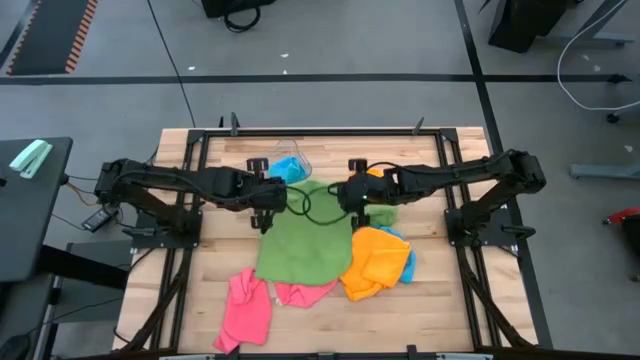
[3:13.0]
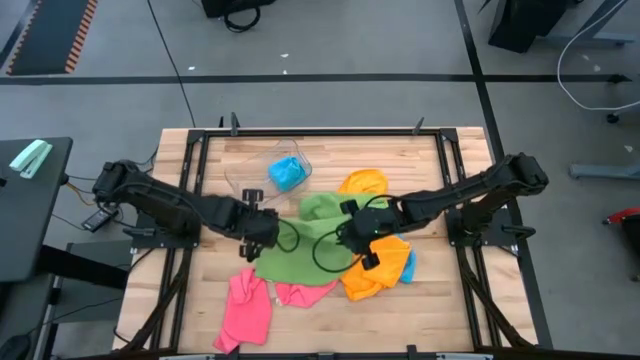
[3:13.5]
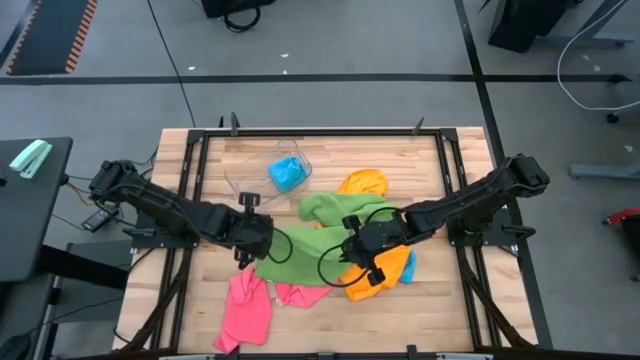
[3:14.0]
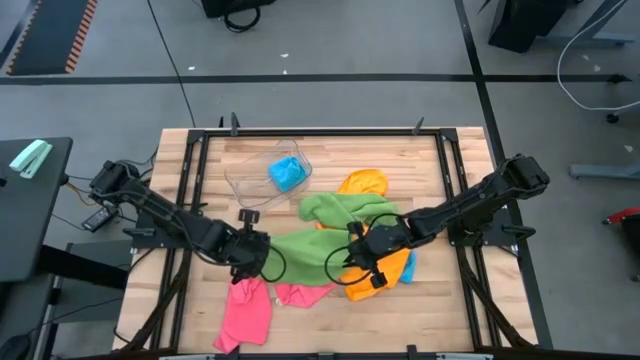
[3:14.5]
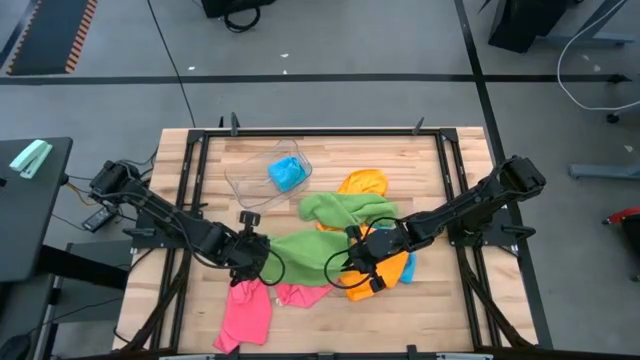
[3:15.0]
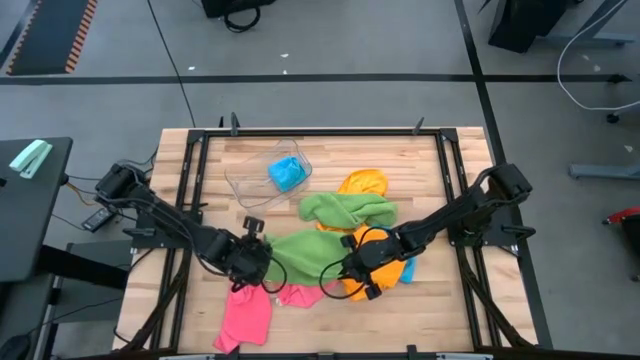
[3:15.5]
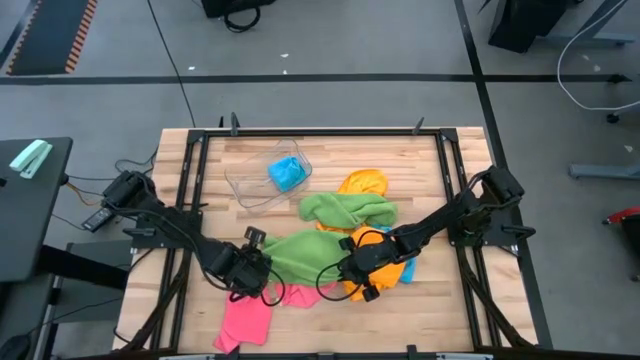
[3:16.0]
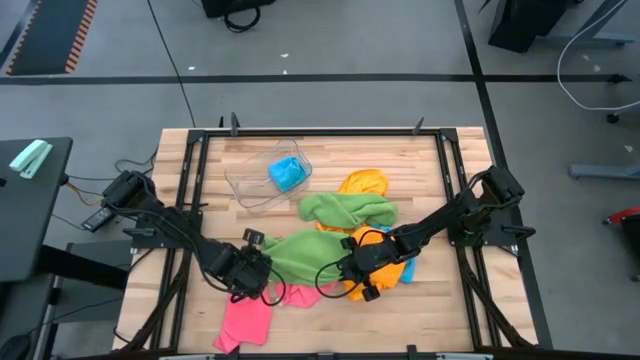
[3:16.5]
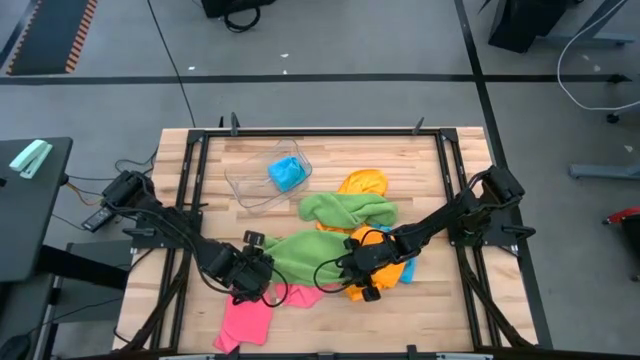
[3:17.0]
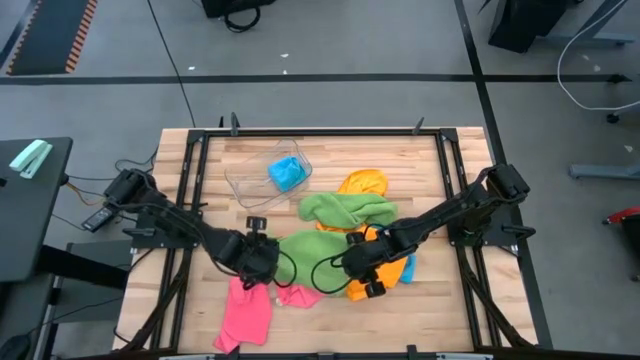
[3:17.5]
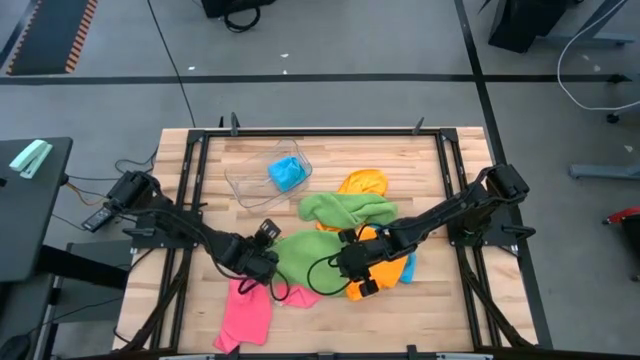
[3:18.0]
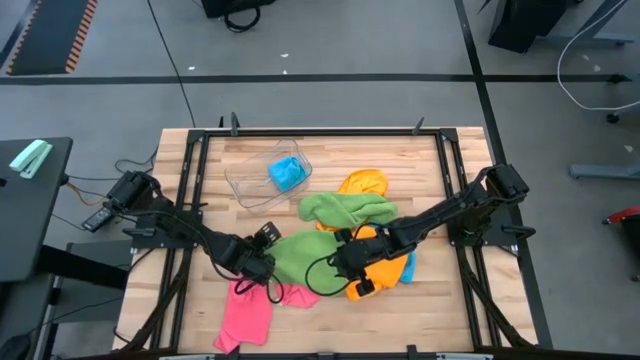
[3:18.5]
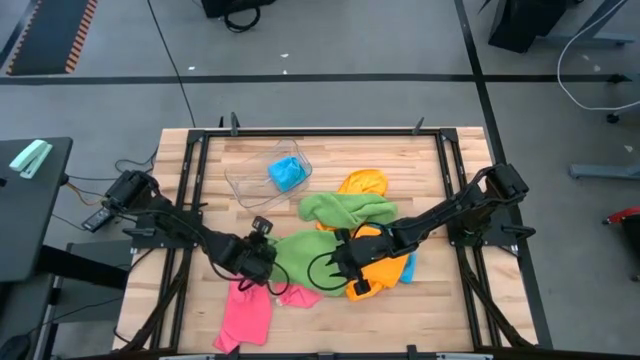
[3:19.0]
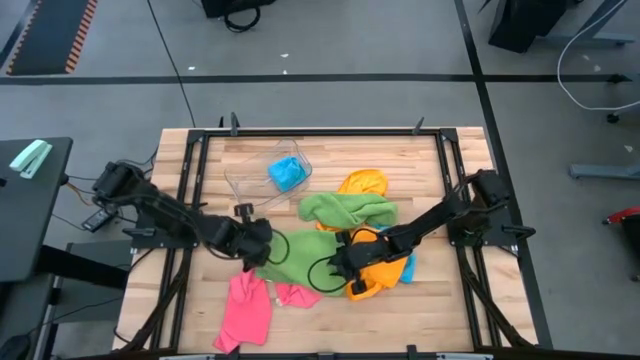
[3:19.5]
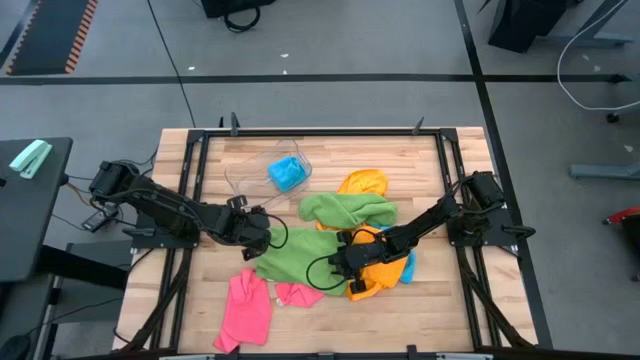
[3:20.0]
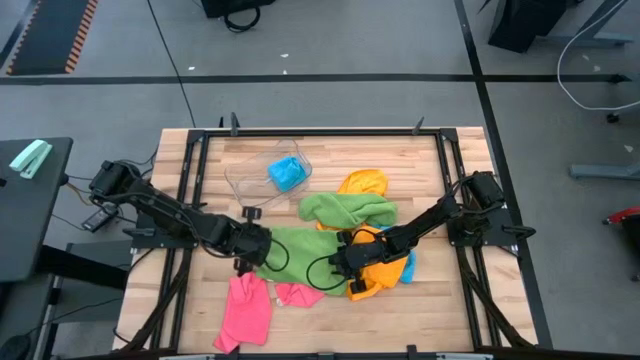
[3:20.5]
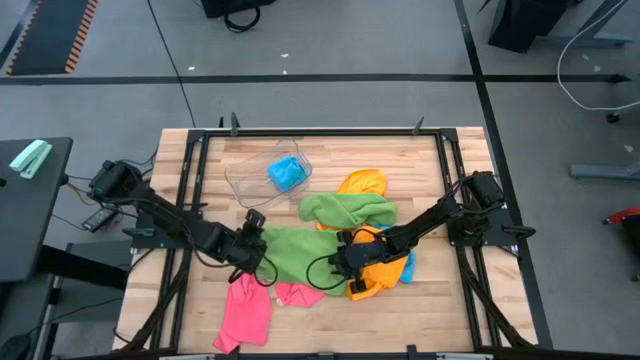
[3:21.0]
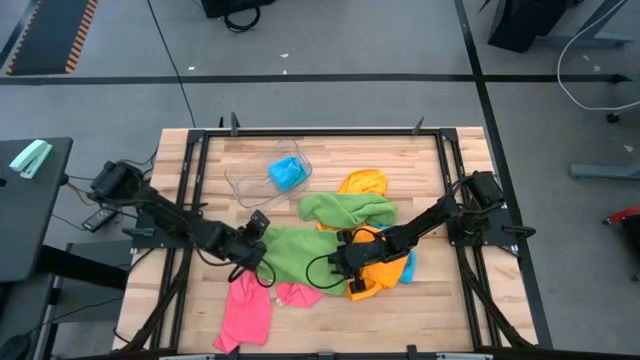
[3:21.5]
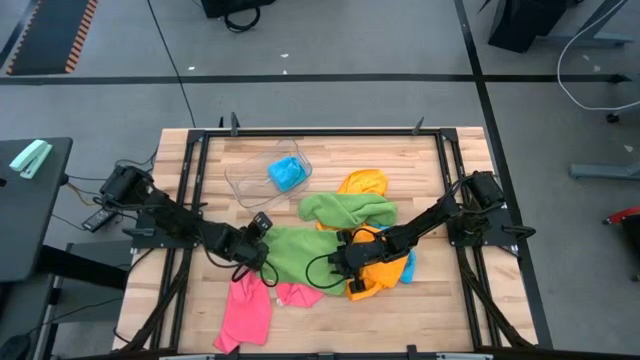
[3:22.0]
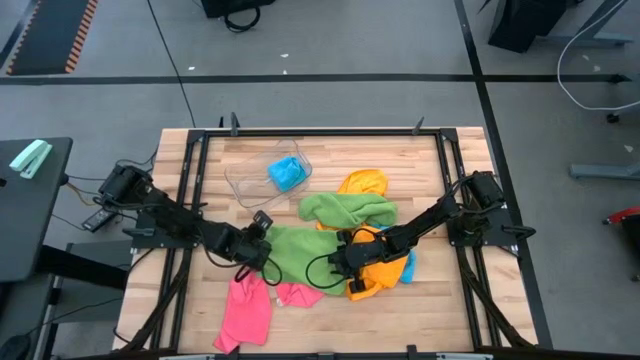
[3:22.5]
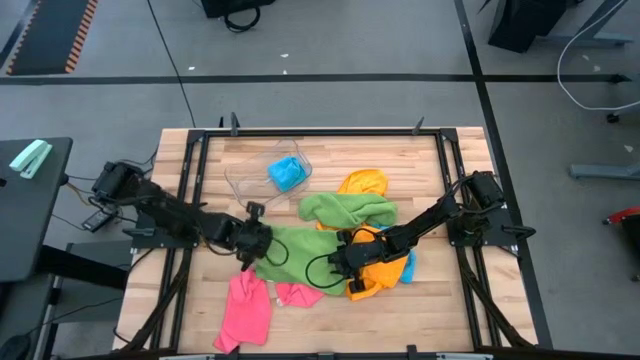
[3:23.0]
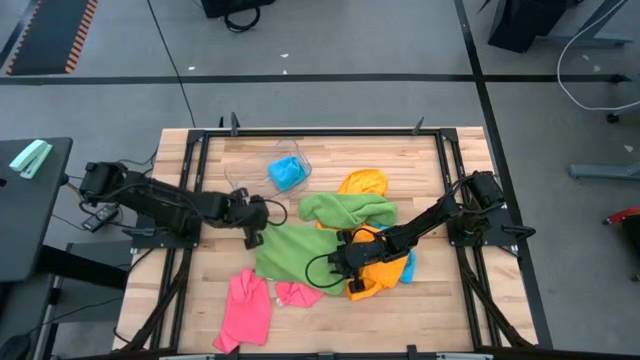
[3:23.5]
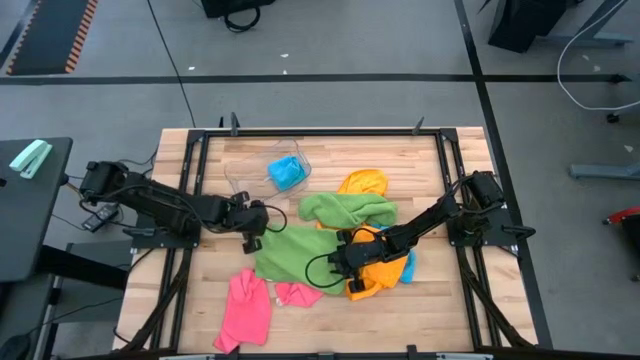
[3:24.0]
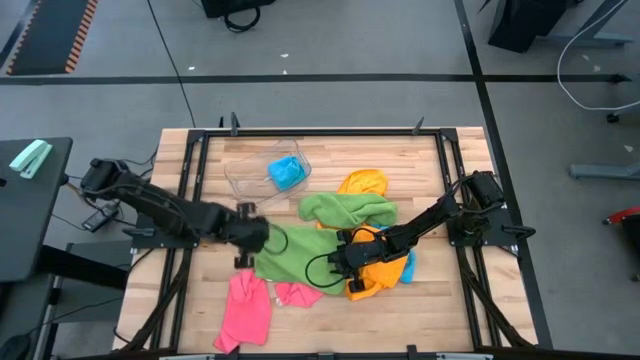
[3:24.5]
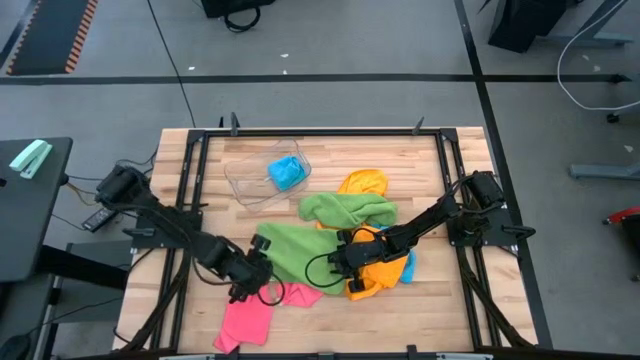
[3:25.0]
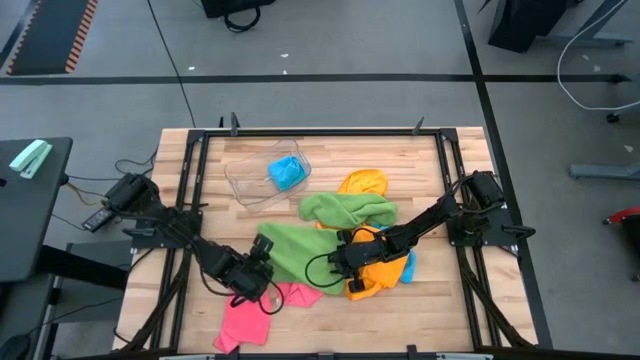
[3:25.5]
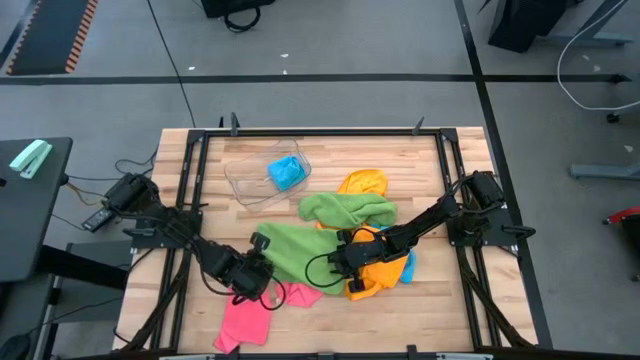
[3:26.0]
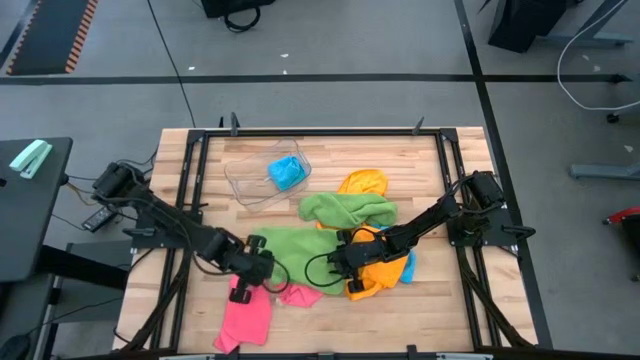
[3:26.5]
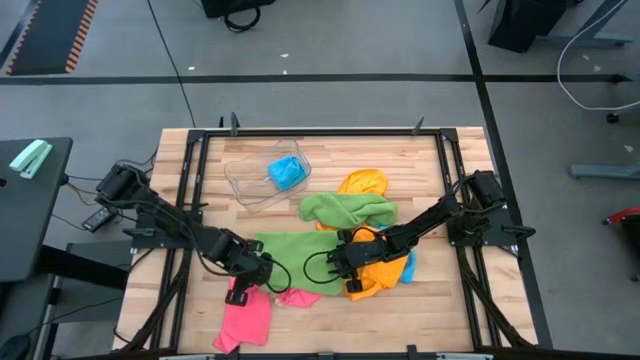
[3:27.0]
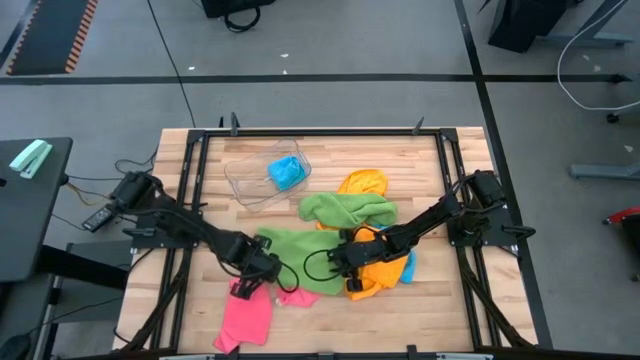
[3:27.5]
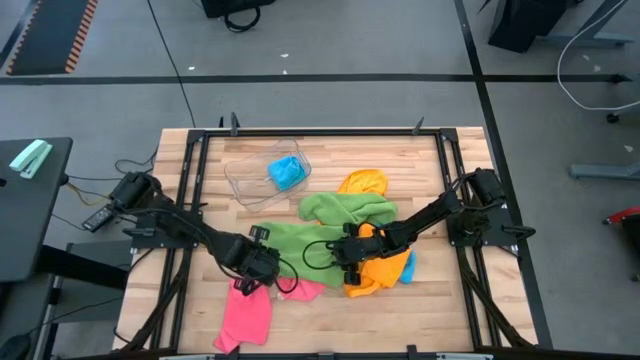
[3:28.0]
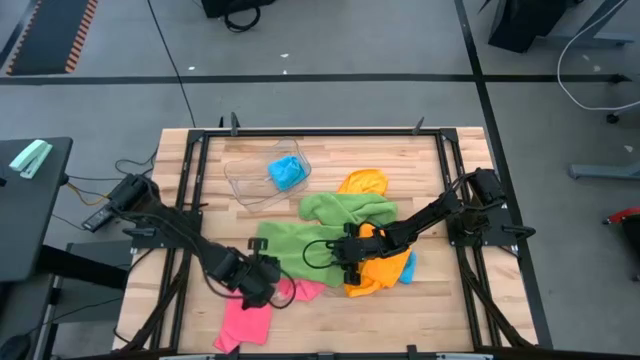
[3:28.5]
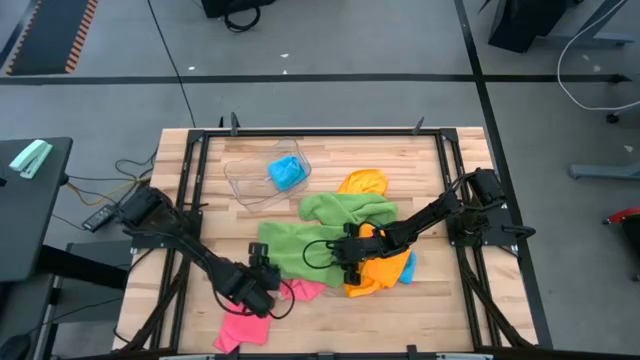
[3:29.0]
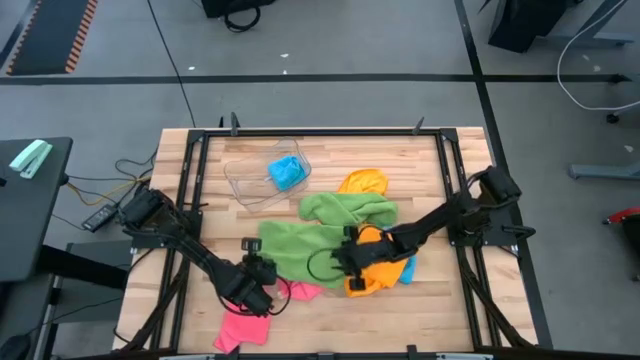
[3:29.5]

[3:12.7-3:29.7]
Task: Fold microfiber towels
Fold the left green microfiber towel

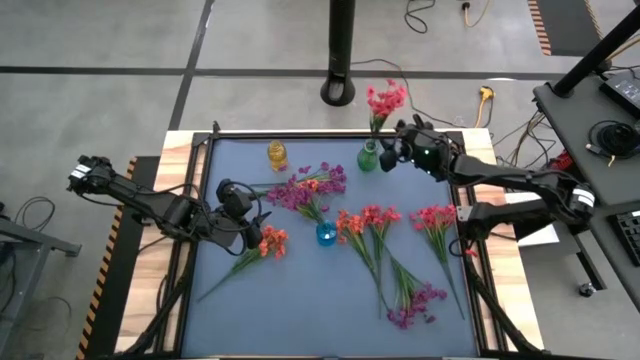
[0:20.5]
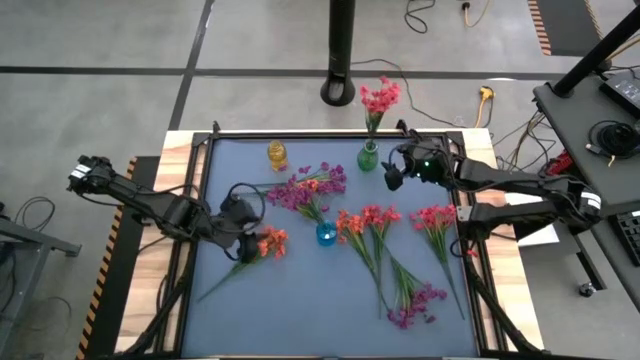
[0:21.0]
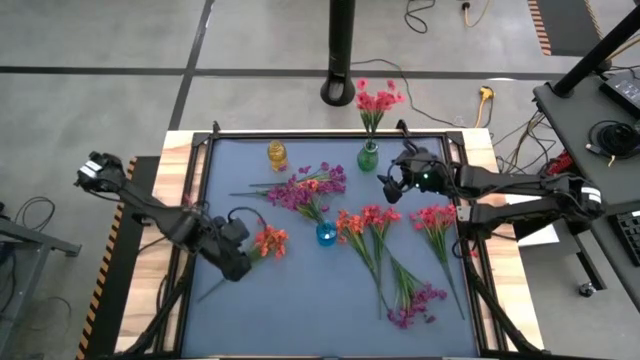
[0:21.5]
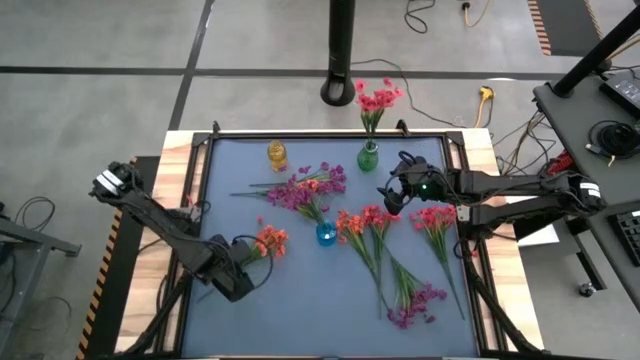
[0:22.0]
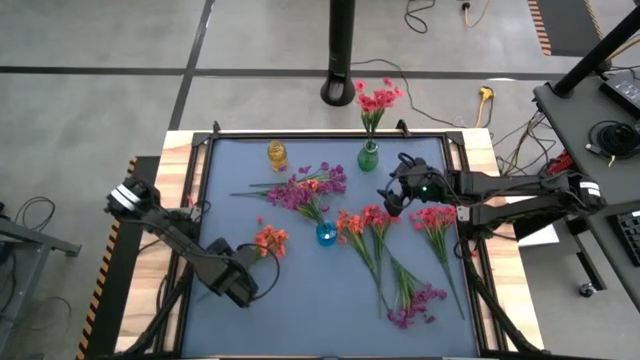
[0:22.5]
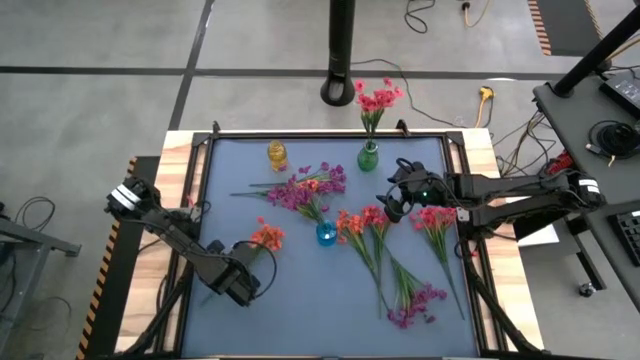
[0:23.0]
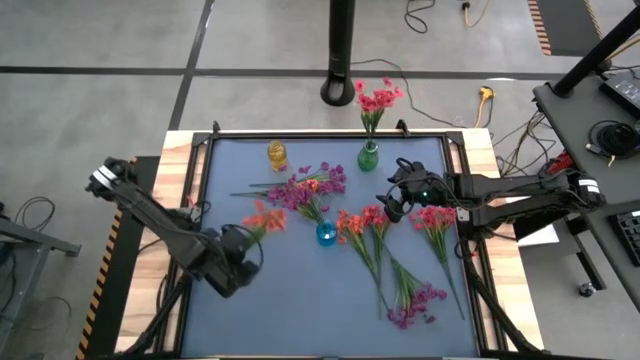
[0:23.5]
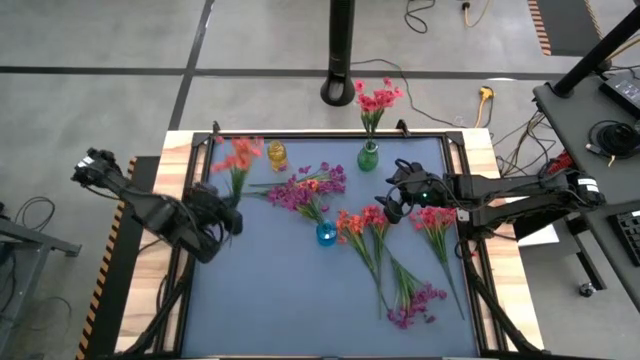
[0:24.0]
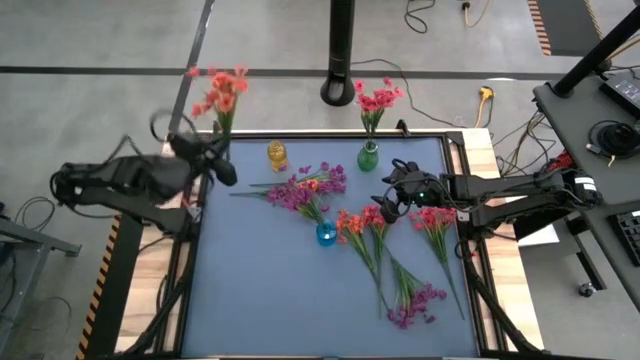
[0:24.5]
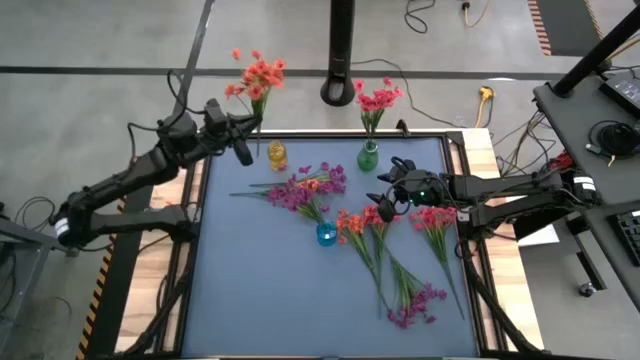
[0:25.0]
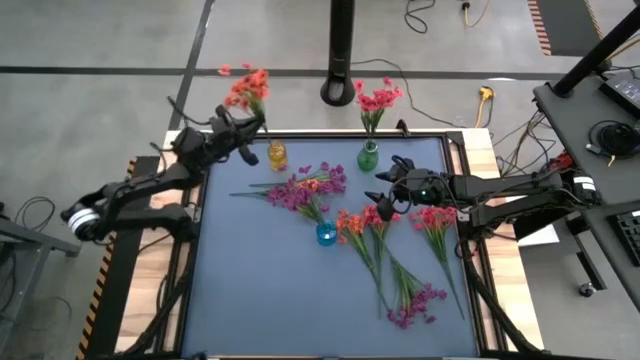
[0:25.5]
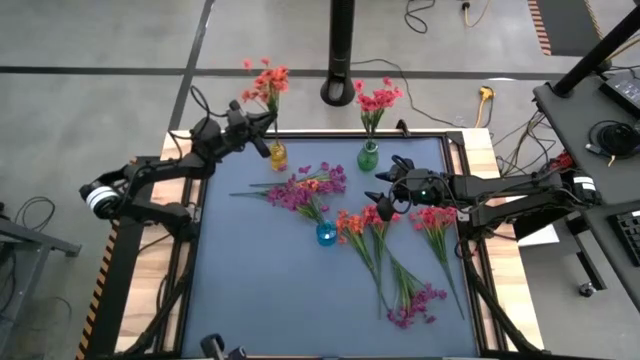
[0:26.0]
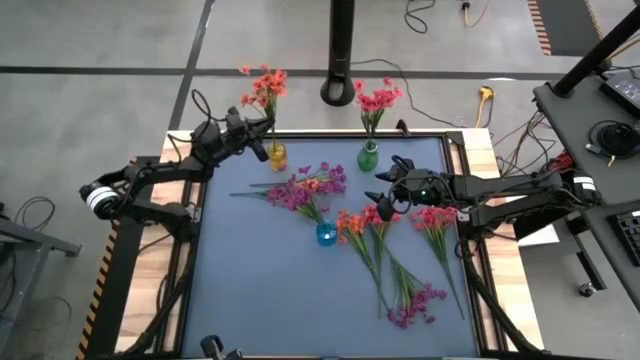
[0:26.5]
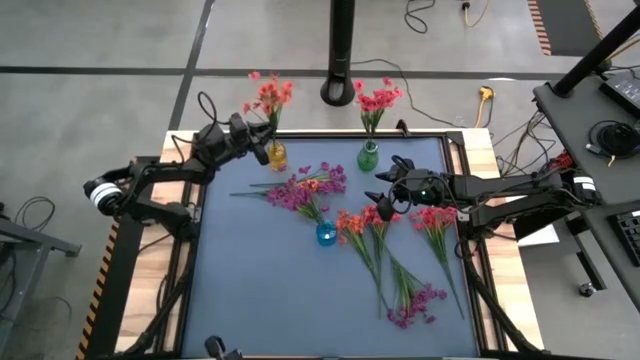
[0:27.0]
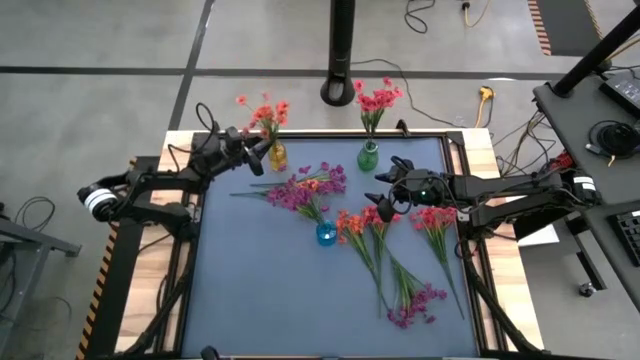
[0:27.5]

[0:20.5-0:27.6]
Task: Sort flowers into vase by color
Put the left orange flower into the yellow vase
